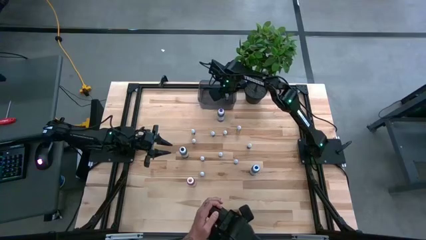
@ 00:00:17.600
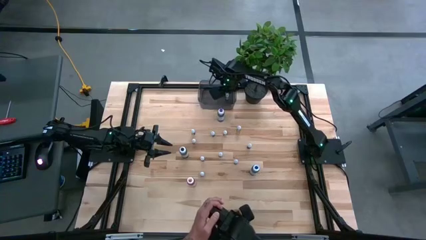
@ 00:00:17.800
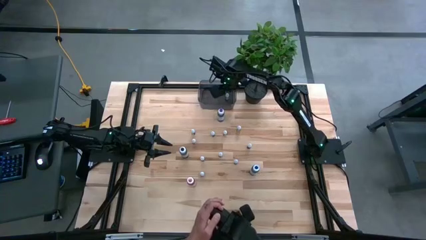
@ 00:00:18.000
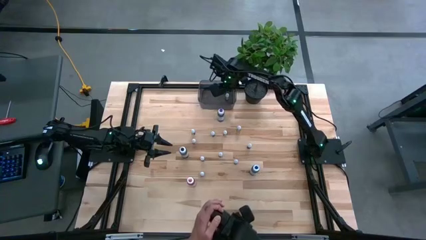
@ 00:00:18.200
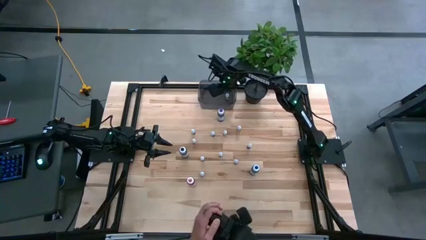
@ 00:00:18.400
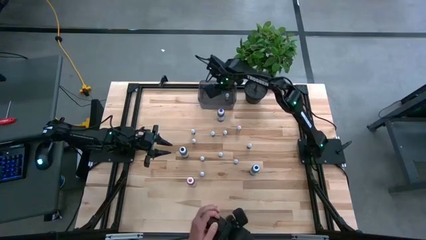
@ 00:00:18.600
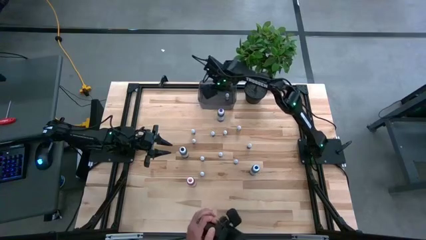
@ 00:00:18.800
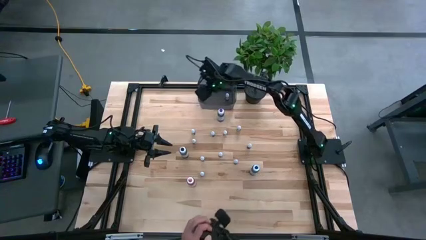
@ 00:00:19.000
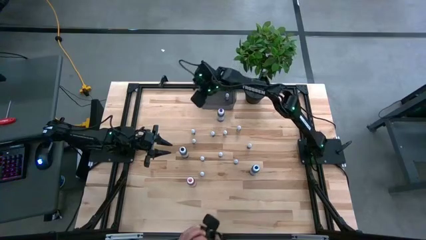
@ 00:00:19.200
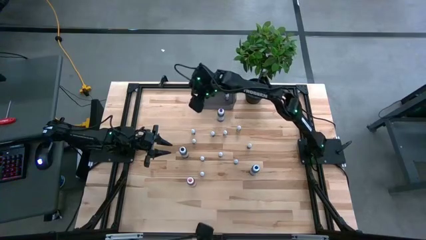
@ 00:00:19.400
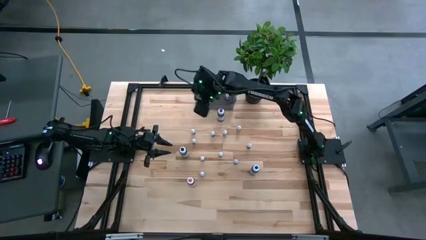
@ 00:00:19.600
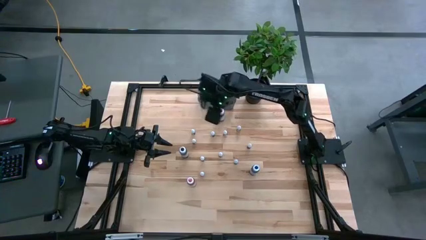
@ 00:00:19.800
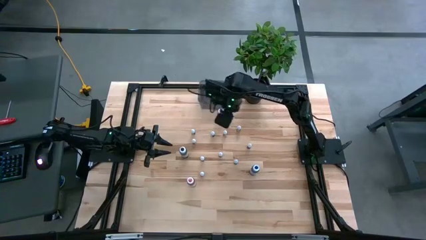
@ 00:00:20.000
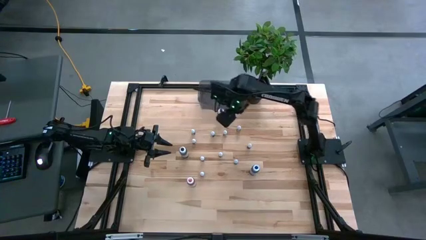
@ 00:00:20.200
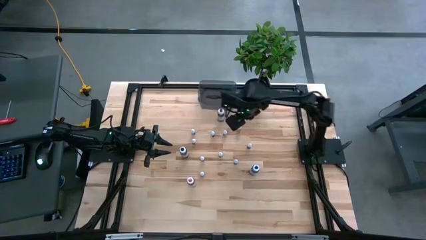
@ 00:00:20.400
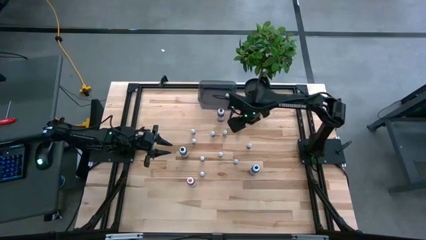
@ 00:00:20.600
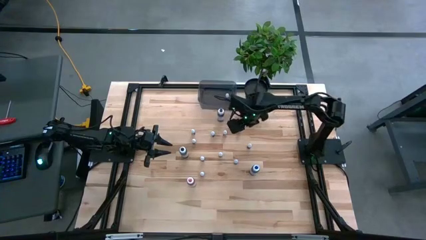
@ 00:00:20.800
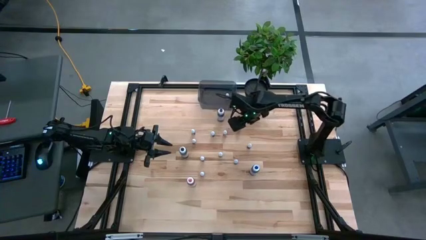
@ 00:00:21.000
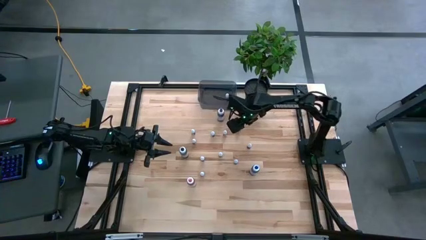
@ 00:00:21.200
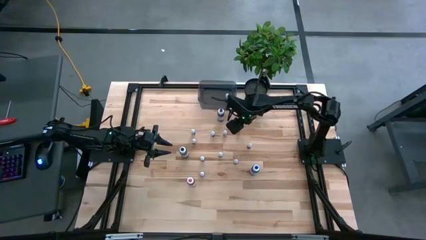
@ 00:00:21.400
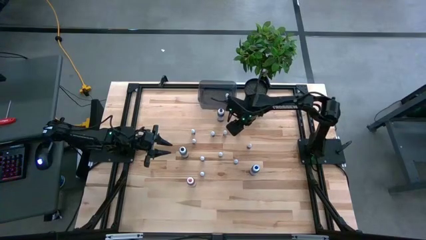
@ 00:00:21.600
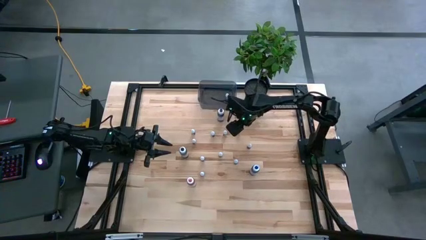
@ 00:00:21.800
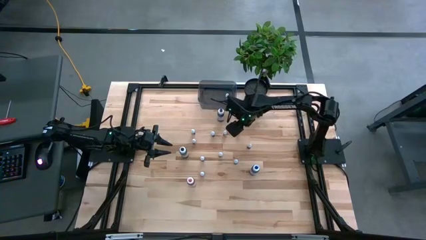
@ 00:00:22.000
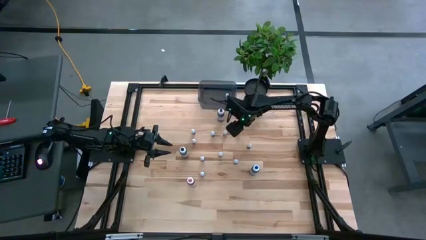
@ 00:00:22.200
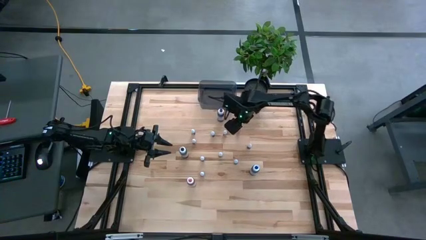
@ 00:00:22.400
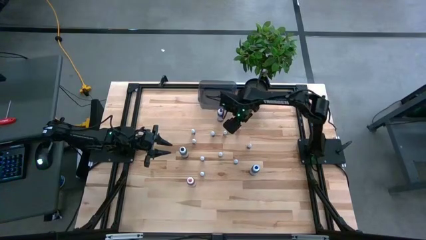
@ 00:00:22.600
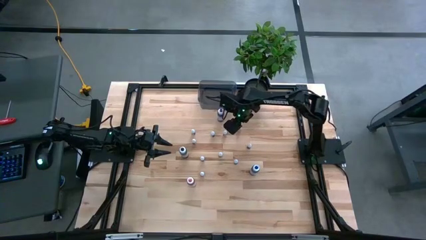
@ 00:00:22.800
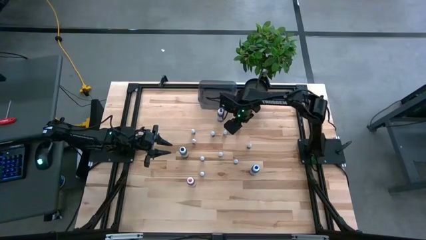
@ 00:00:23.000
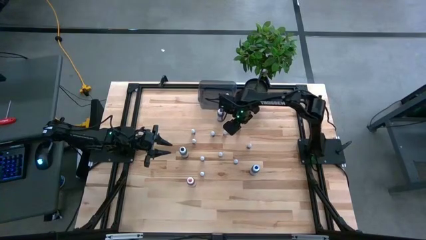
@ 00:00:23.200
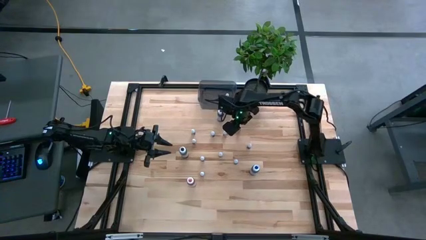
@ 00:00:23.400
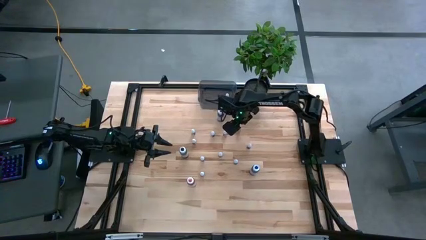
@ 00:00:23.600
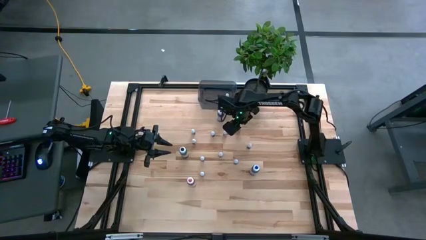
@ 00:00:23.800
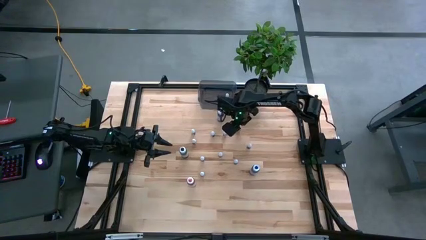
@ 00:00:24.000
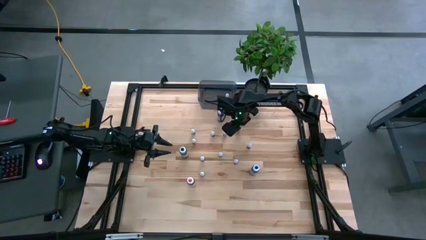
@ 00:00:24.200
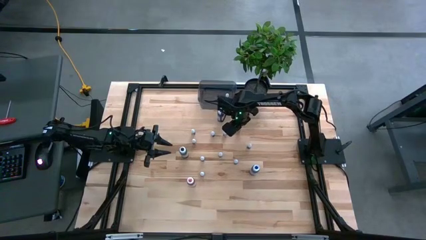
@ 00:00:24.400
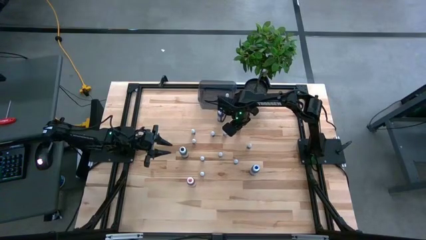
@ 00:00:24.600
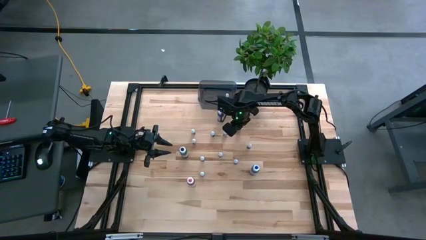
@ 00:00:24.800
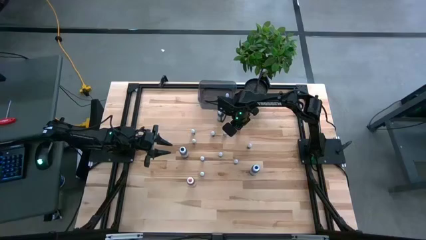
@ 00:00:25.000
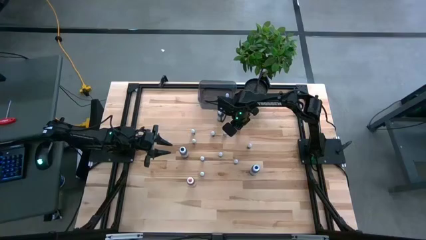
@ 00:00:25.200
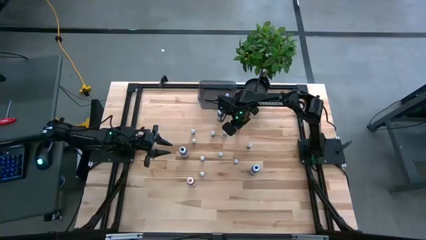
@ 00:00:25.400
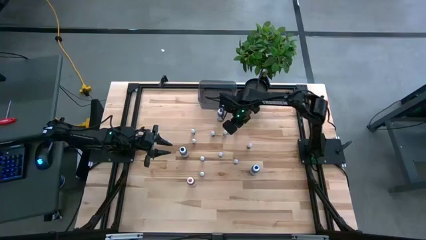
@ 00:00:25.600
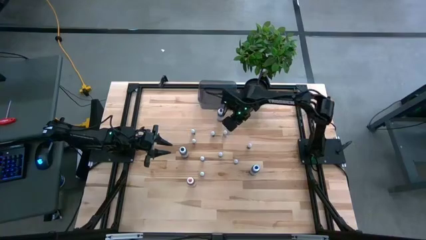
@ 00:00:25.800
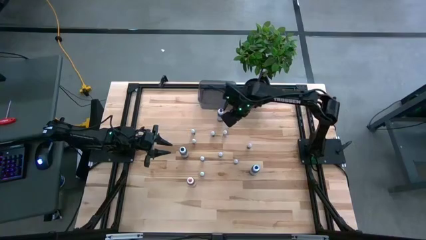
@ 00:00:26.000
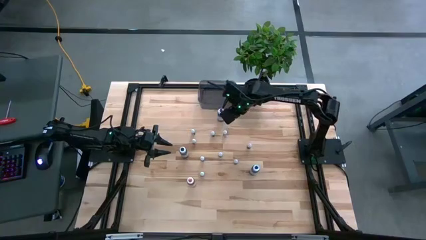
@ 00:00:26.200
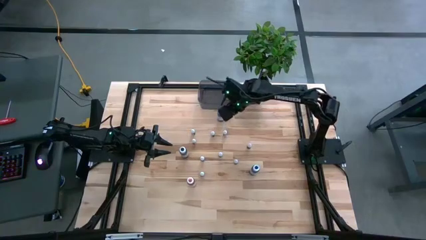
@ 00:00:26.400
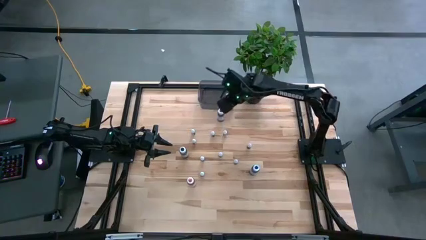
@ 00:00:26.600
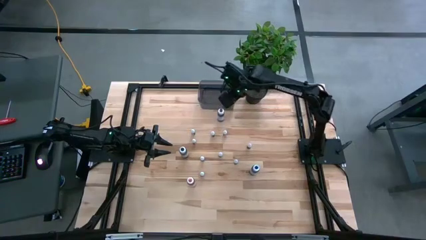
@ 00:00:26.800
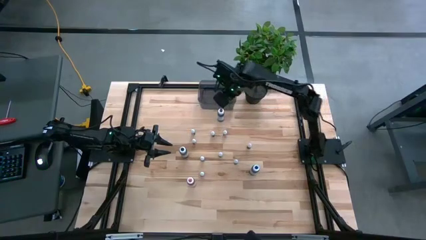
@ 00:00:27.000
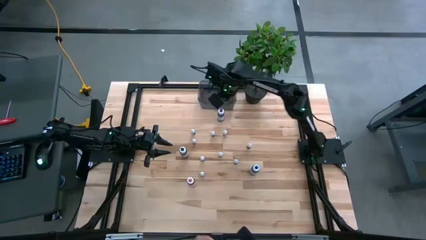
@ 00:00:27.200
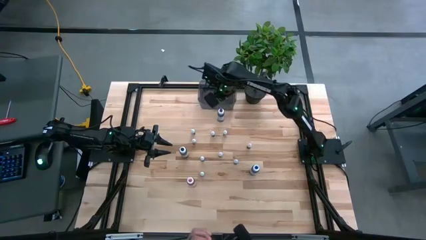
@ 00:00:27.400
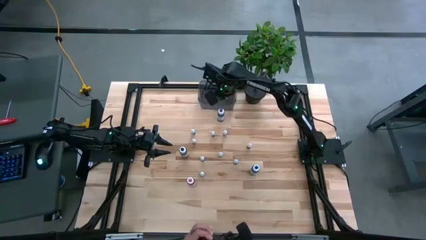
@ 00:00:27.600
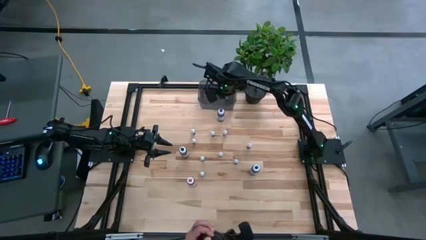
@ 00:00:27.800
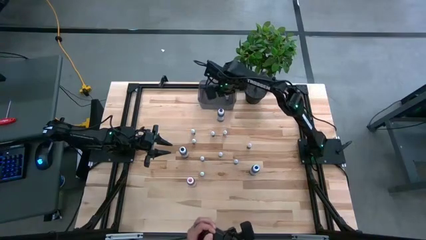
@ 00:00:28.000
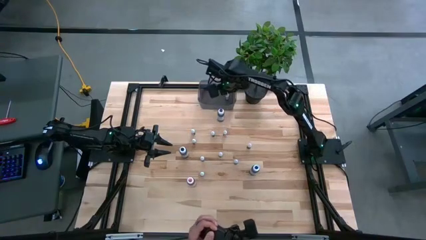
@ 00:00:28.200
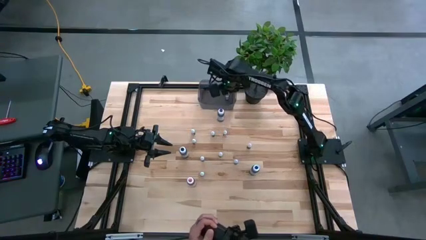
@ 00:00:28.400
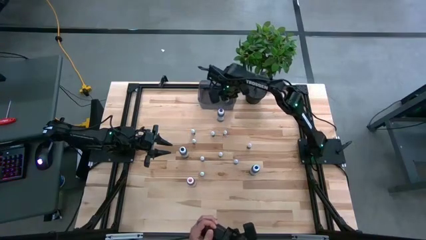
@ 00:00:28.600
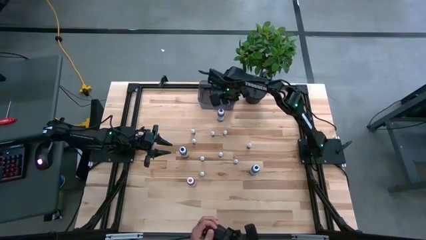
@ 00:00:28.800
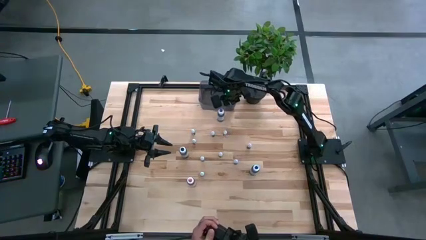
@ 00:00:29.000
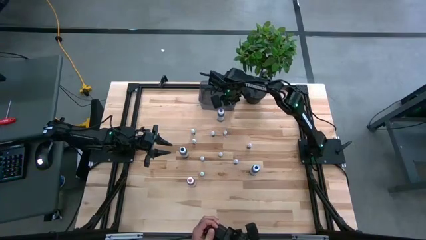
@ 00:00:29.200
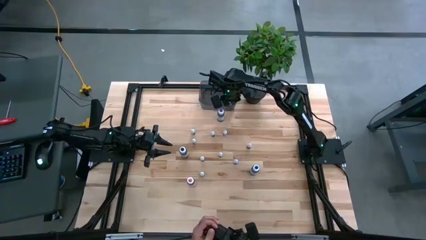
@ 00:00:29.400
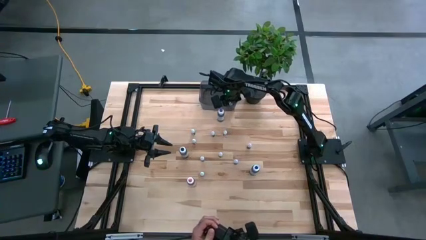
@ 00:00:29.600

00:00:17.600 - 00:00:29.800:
Task: Pick & Place food coloring
Put the small violet food into the black bin
